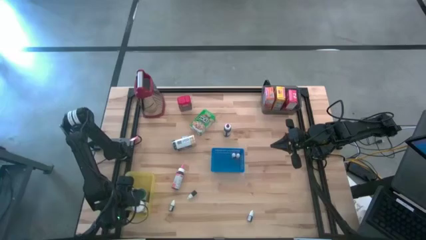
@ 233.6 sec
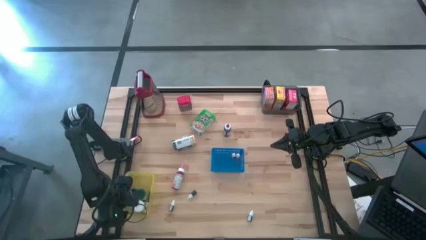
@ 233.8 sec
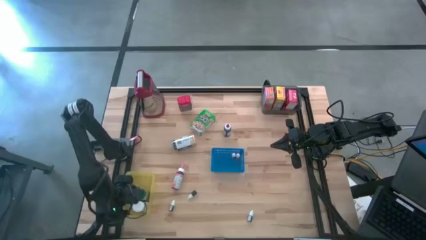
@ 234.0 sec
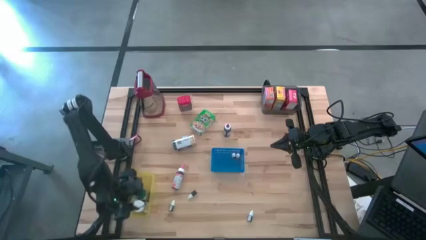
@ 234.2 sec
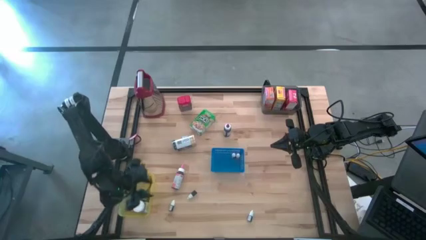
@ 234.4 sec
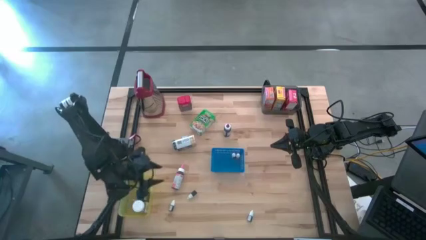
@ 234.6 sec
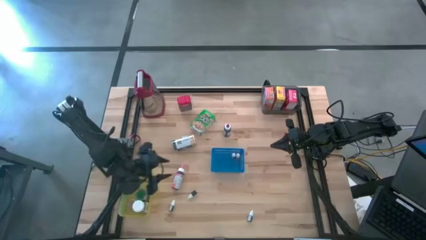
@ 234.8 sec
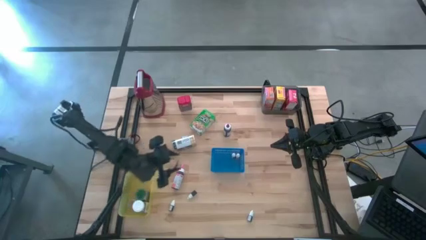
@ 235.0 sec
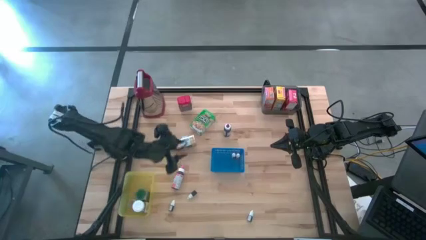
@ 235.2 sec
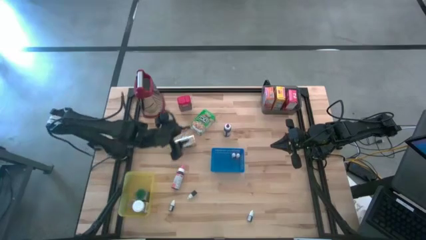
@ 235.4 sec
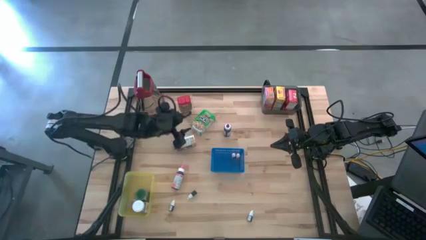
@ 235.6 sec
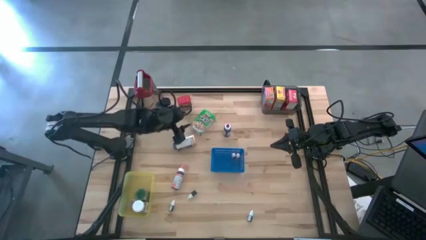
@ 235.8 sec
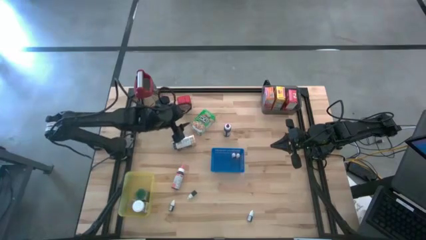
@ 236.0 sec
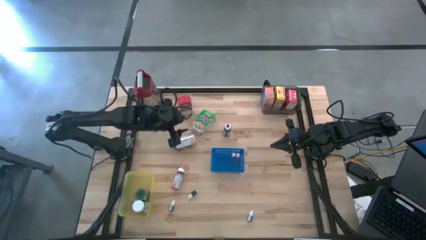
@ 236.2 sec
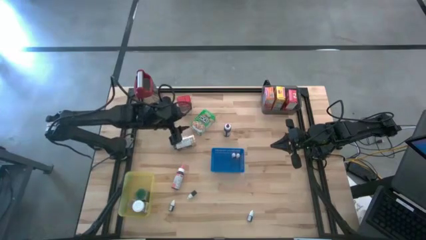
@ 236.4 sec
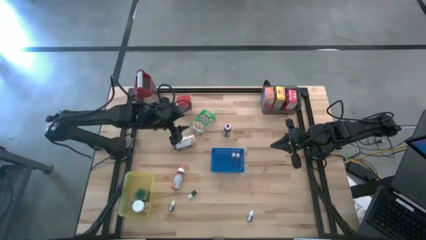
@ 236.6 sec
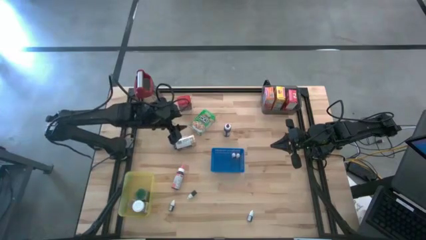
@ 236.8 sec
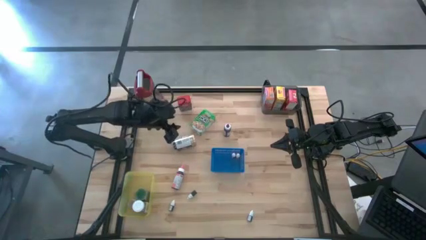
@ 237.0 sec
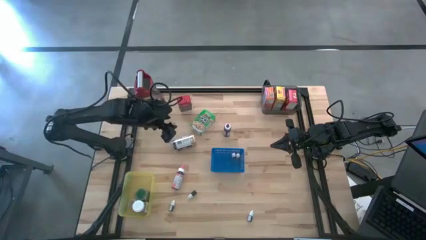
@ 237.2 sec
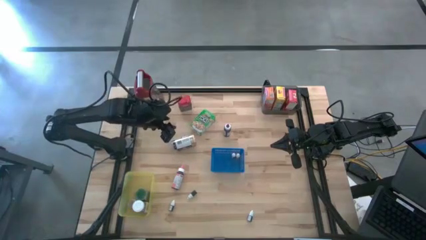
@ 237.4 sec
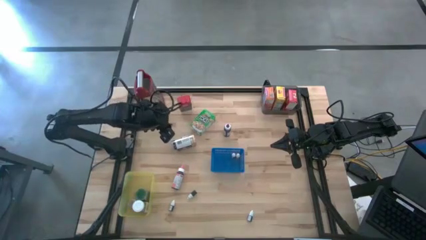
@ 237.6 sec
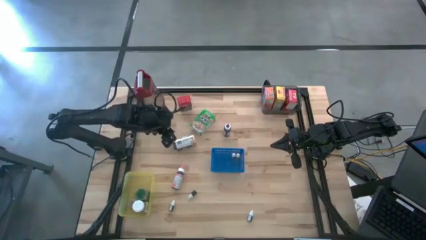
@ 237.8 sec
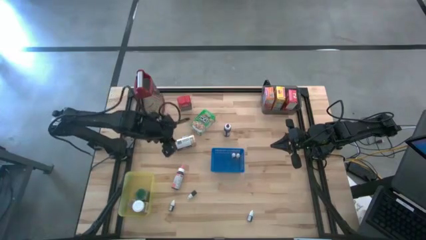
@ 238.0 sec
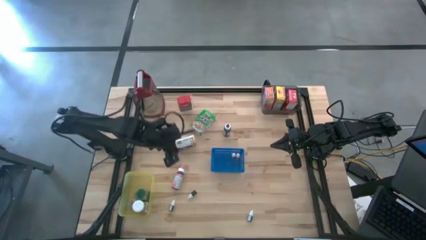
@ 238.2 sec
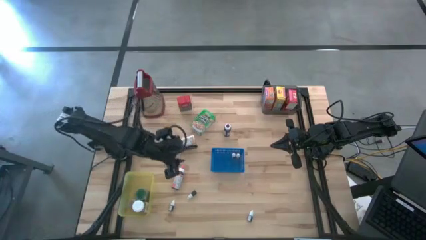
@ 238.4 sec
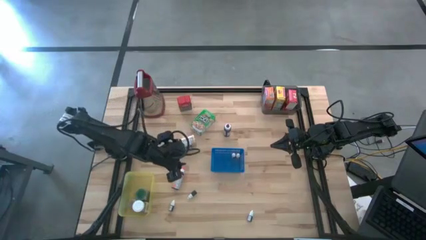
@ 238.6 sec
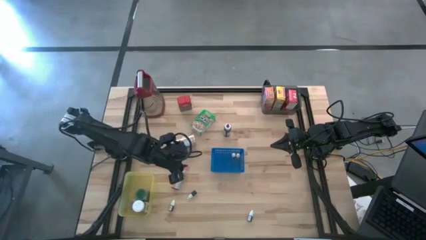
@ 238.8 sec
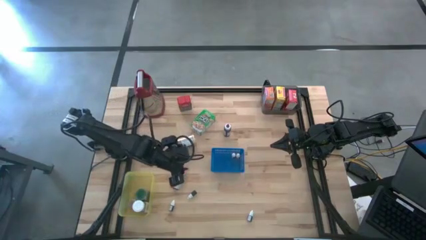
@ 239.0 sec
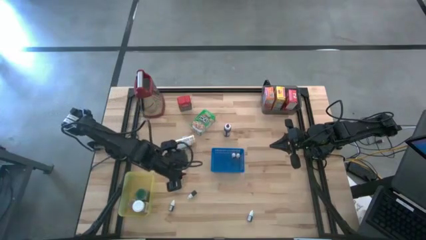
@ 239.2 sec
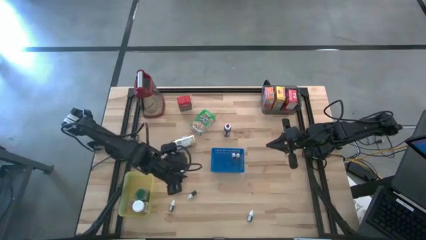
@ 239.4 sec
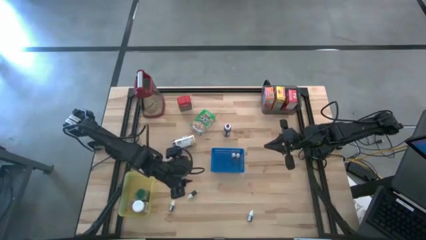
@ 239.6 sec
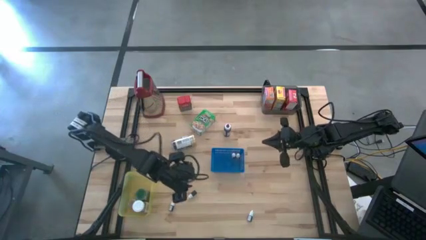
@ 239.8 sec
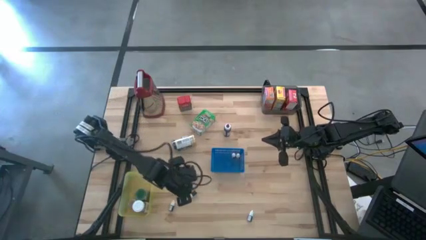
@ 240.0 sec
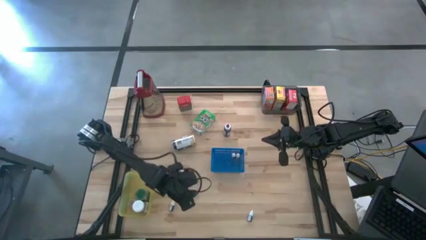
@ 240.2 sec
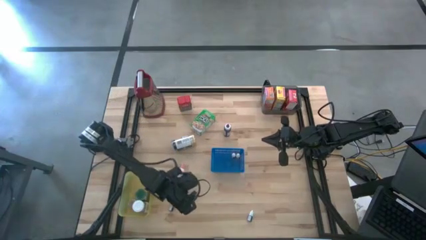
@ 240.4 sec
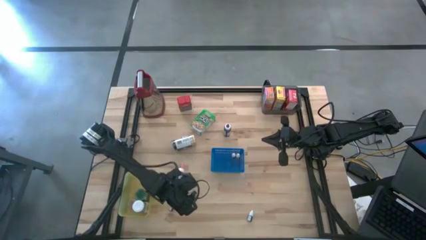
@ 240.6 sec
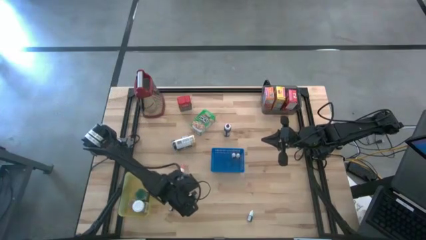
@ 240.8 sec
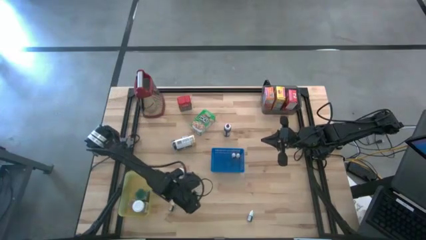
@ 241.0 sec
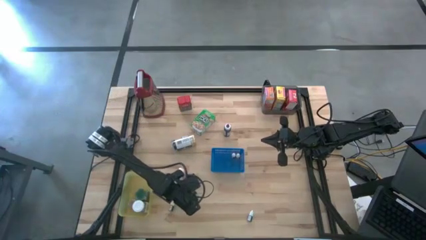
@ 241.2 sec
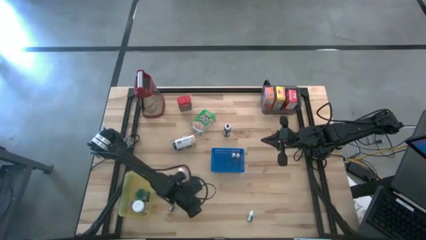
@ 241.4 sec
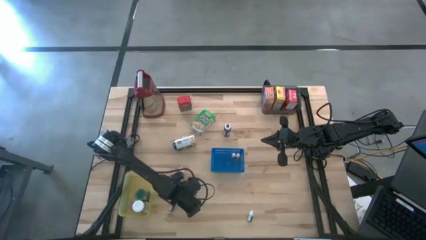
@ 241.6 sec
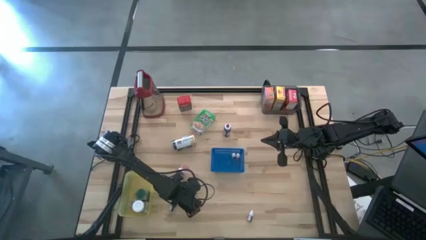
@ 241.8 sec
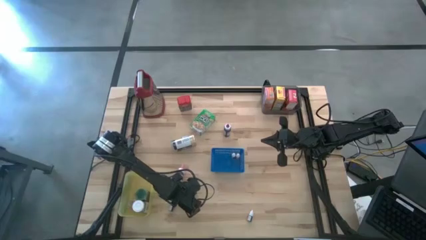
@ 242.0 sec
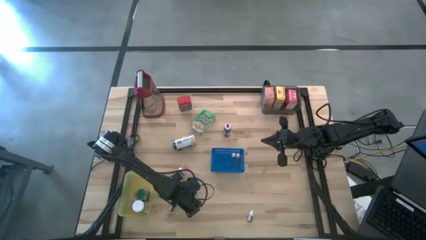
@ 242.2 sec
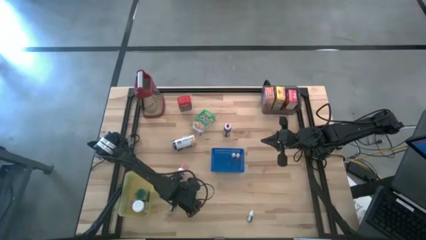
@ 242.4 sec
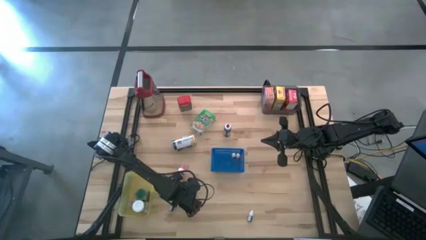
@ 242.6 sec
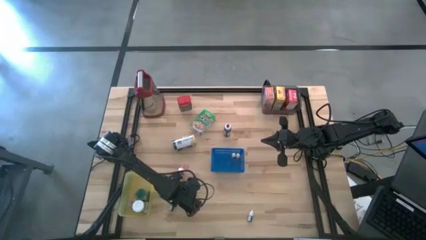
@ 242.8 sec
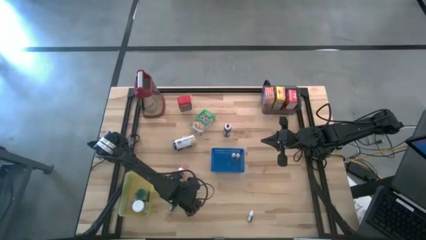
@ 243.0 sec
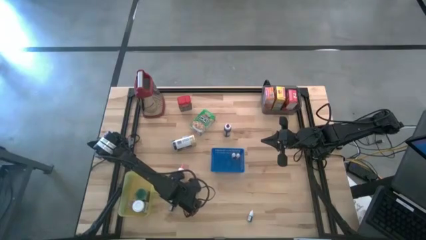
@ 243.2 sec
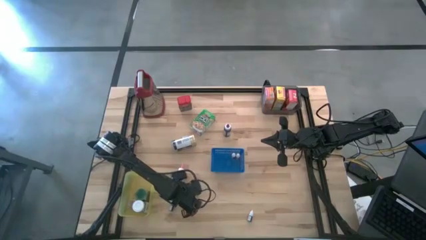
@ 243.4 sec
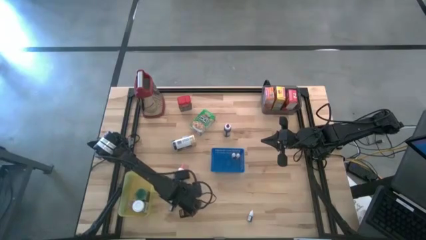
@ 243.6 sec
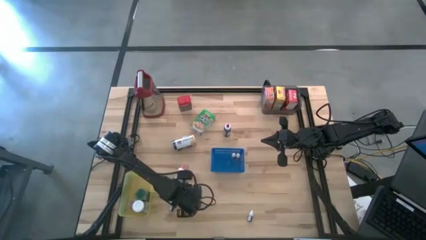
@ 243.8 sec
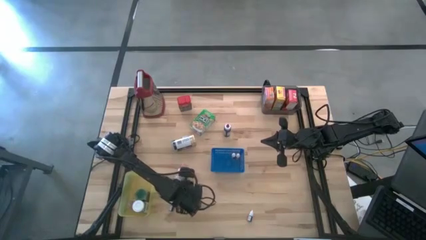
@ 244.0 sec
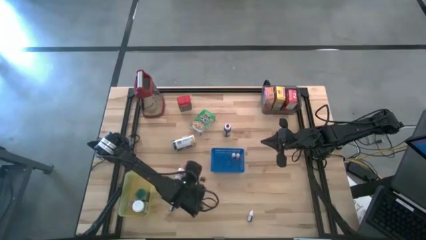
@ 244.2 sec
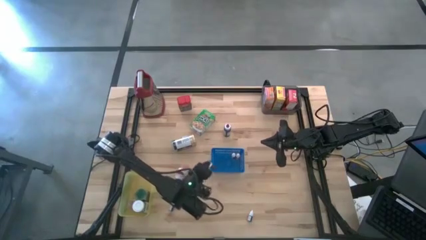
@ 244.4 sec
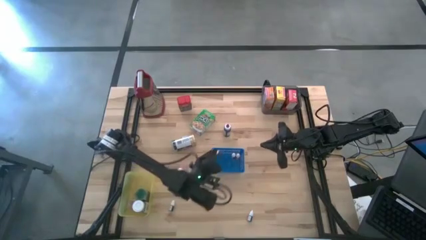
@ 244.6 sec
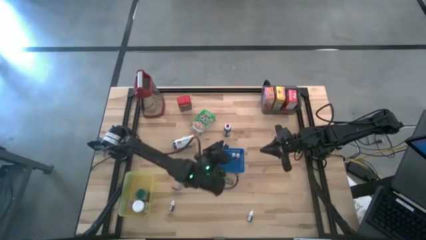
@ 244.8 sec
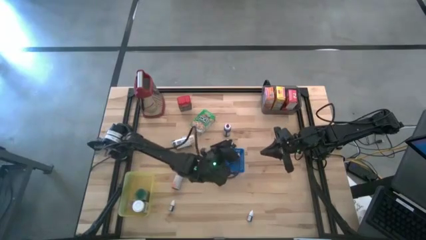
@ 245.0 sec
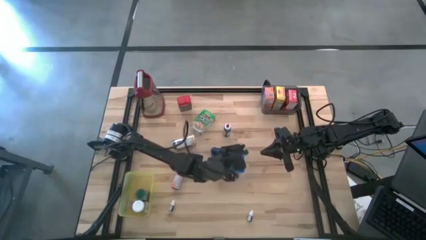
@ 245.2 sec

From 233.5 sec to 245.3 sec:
Task: Pick & Place Kitchen Items
Put the small black food coloring into the blue bin
